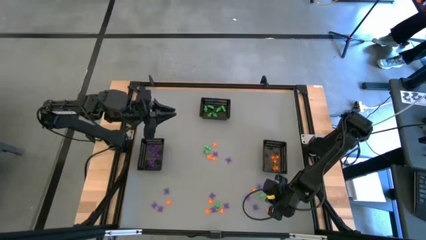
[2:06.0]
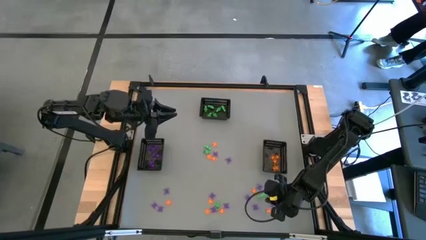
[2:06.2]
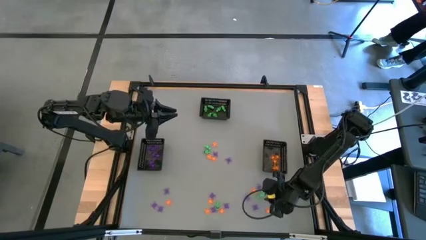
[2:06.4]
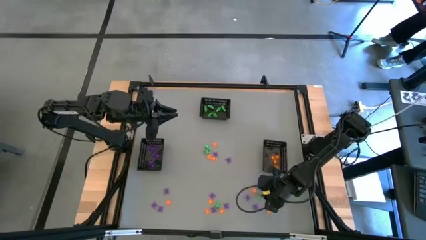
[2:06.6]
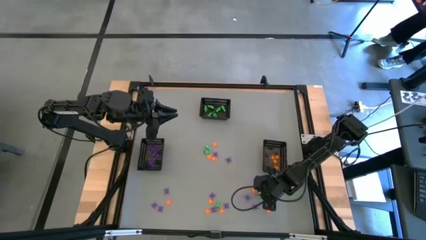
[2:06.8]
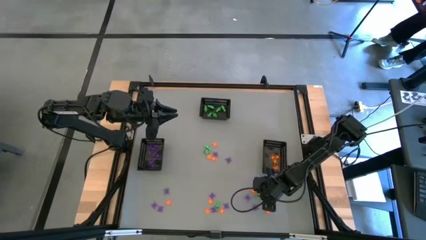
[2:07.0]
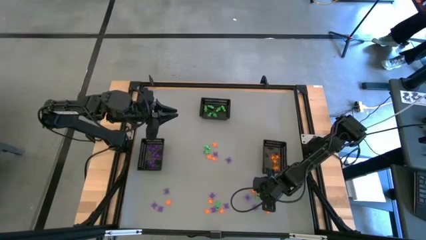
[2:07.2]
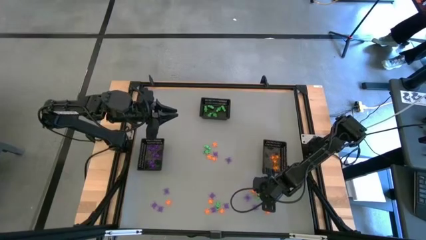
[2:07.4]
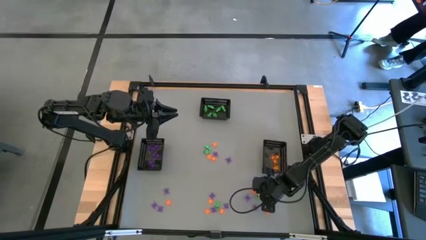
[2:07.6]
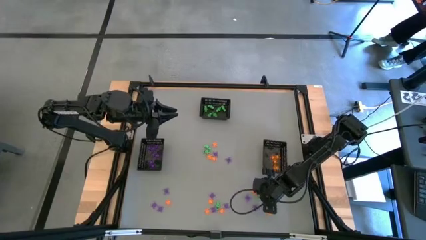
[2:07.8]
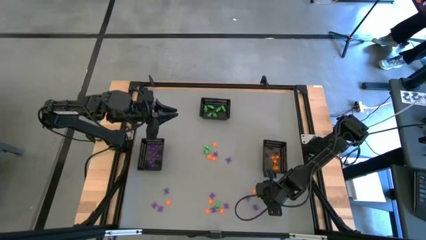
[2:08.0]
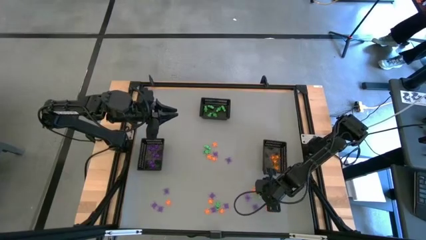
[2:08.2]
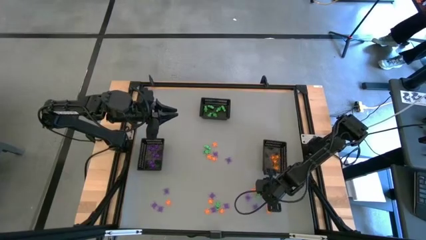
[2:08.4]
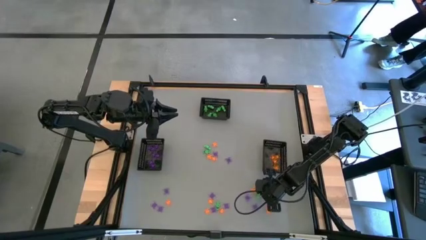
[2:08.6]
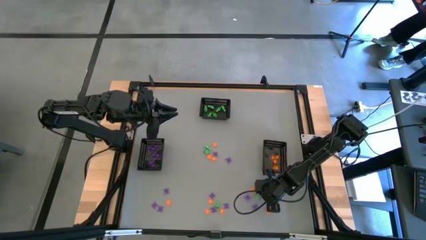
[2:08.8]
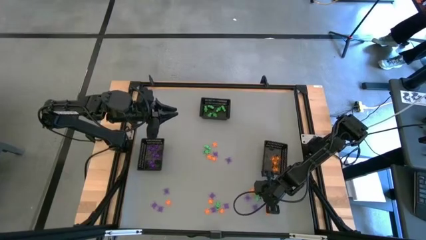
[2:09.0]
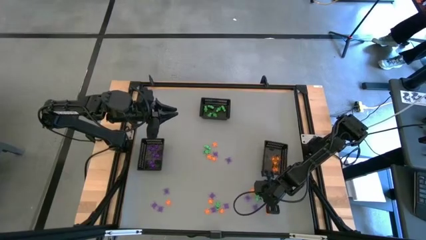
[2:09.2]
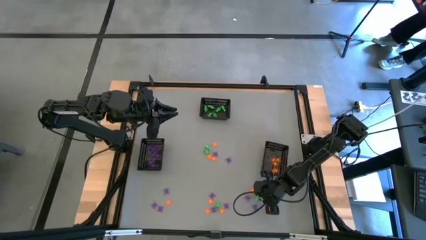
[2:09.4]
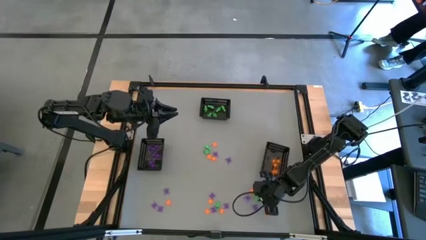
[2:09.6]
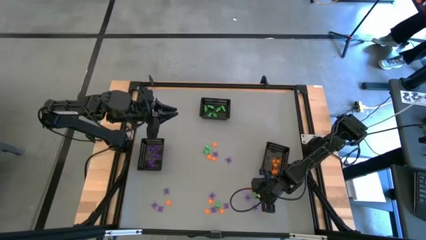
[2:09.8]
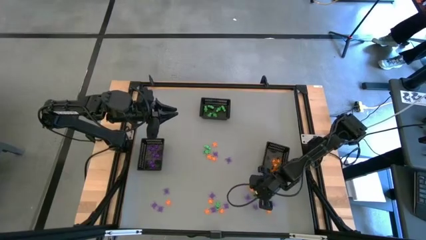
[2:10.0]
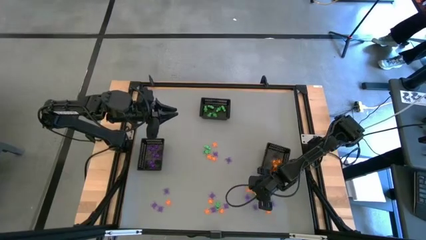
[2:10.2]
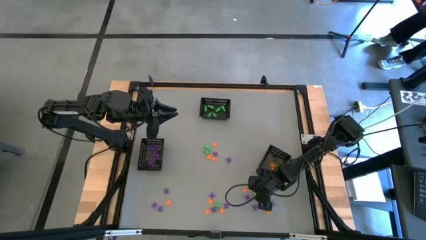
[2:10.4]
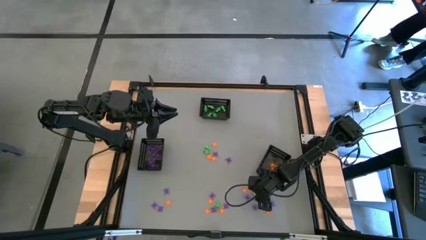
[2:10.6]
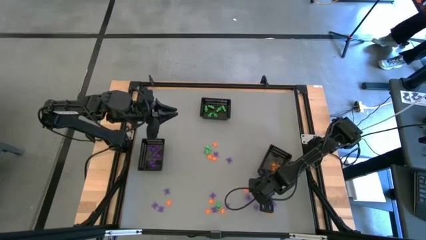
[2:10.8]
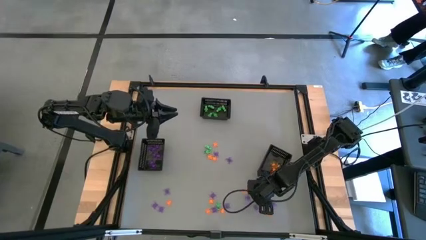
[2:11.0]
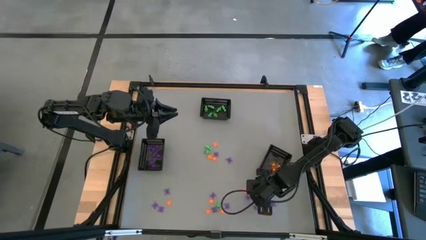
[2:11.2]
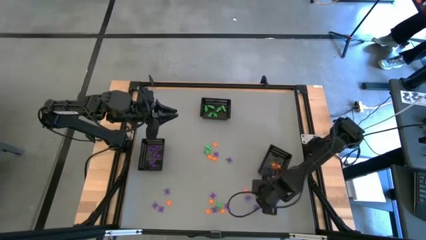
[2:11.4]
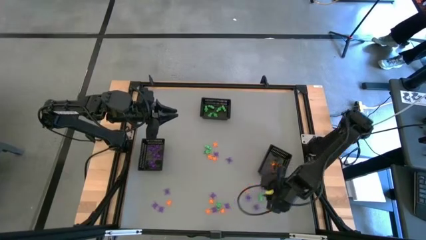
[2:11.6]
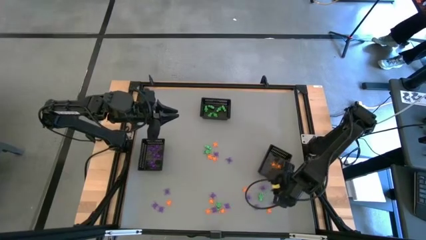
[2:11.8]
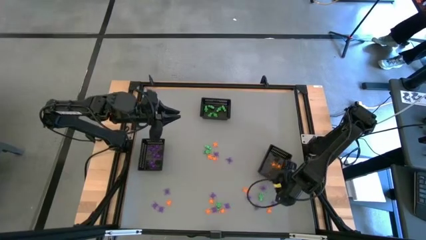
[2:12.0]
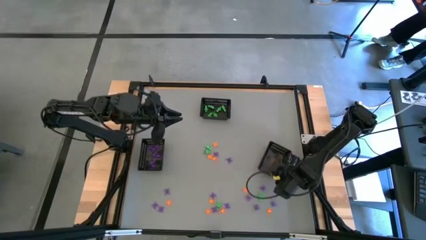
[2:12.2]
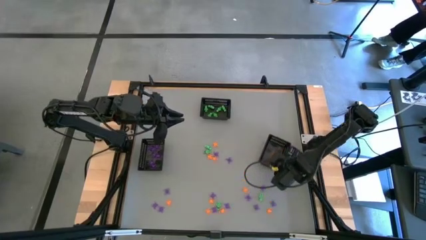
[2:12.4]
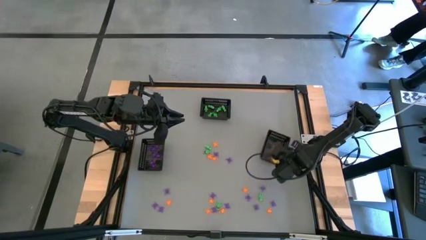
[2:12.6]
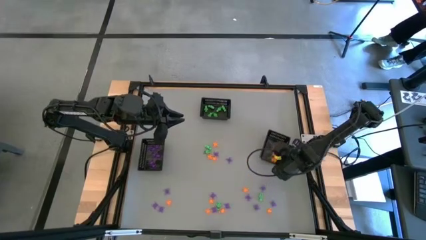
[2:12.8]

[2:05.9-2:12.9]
Task: Sort Halloween decoration
Adjust the right bin

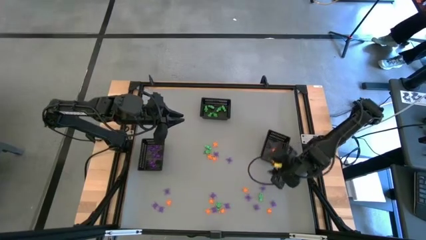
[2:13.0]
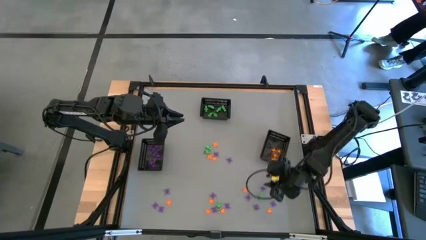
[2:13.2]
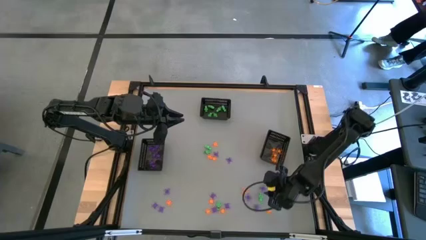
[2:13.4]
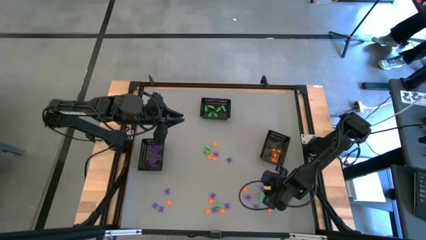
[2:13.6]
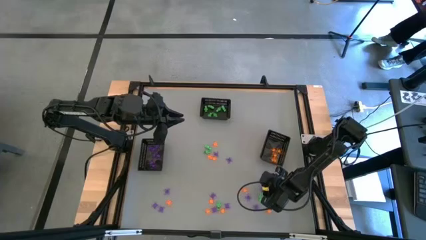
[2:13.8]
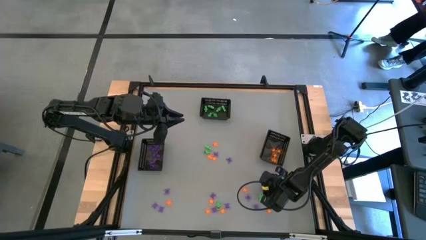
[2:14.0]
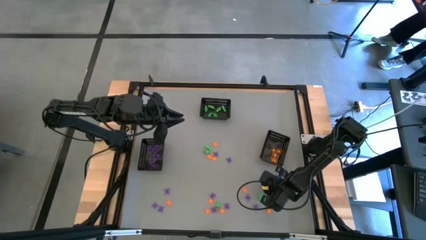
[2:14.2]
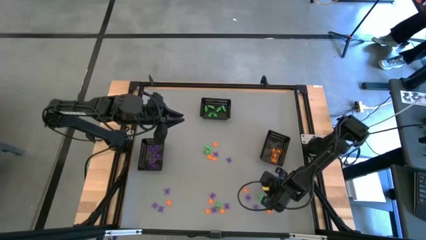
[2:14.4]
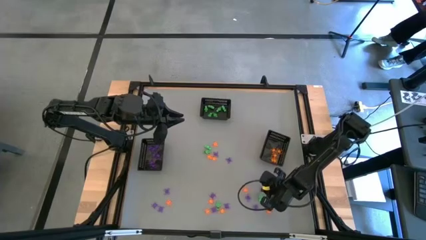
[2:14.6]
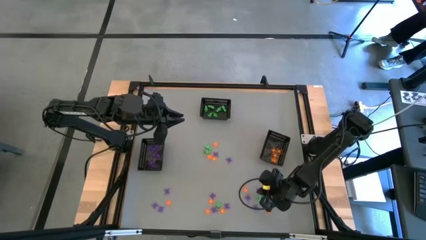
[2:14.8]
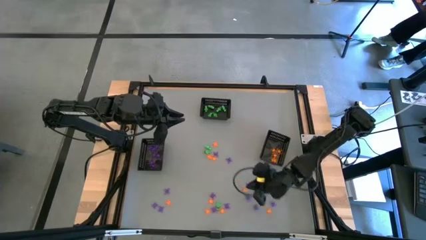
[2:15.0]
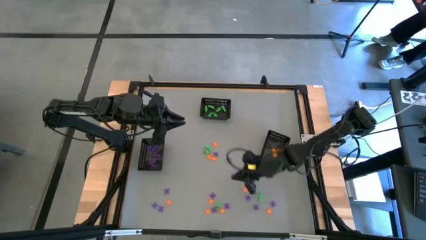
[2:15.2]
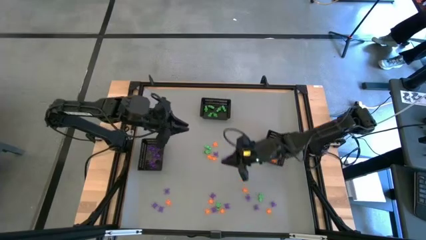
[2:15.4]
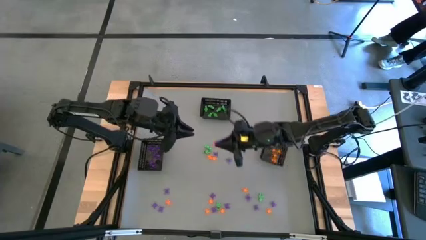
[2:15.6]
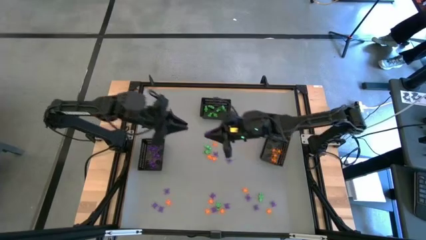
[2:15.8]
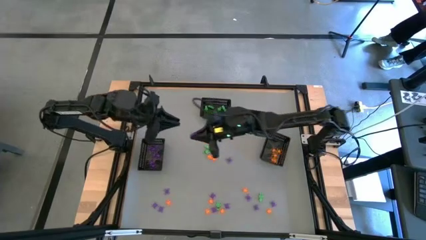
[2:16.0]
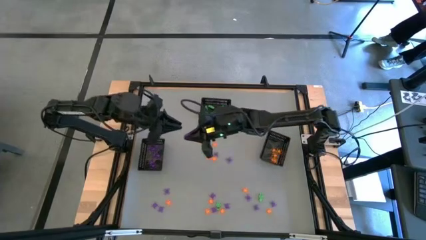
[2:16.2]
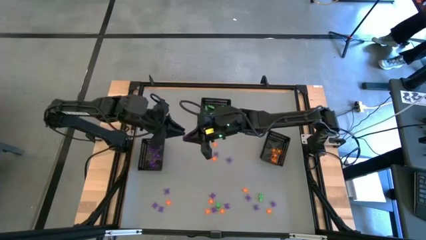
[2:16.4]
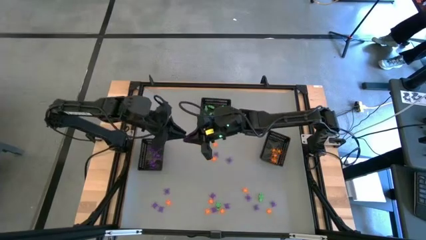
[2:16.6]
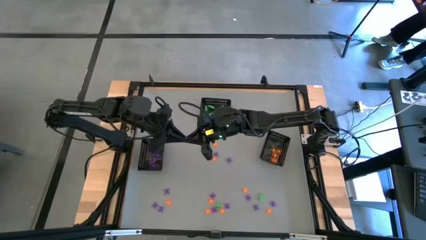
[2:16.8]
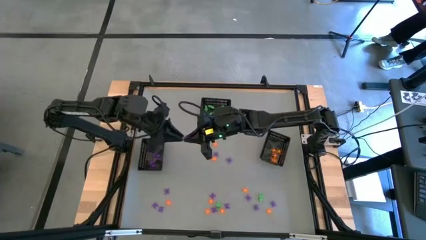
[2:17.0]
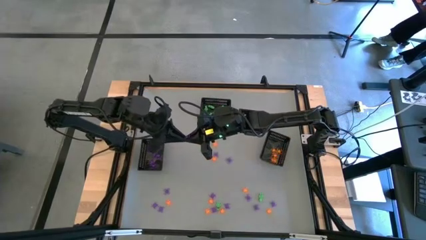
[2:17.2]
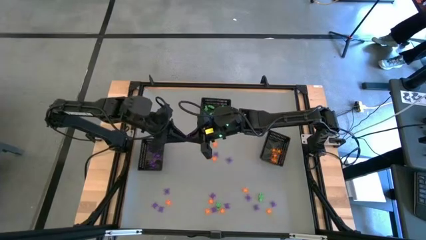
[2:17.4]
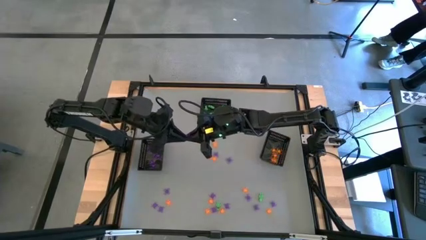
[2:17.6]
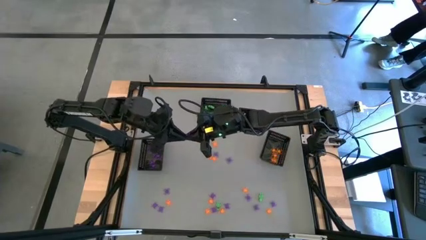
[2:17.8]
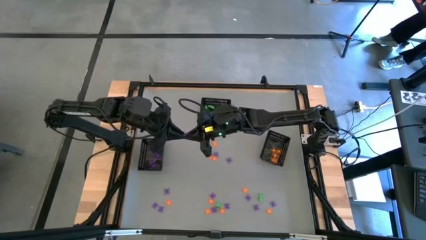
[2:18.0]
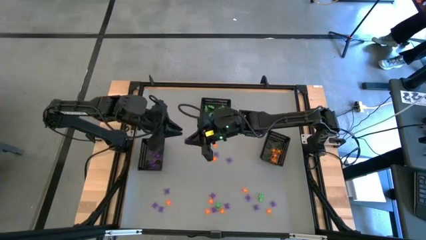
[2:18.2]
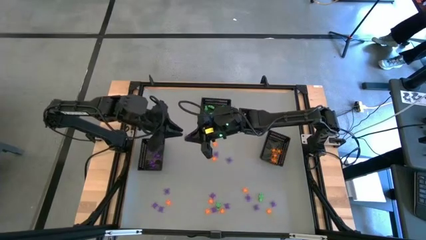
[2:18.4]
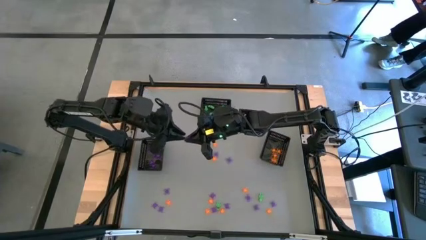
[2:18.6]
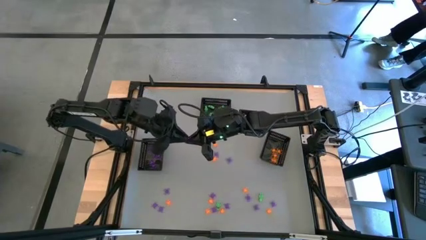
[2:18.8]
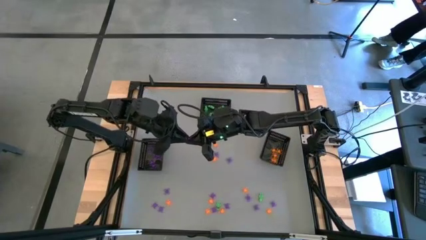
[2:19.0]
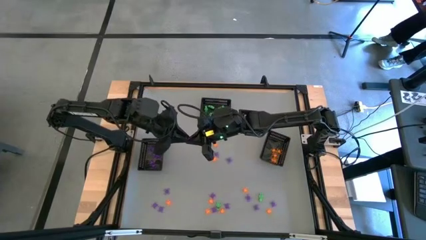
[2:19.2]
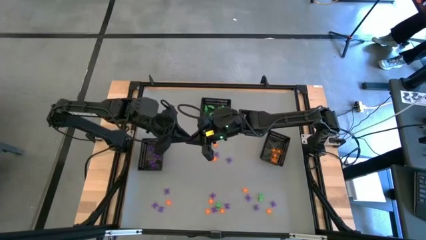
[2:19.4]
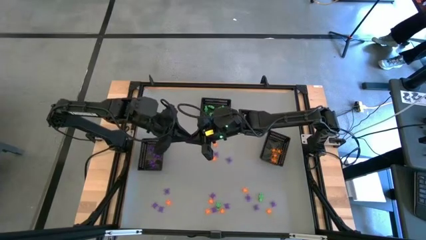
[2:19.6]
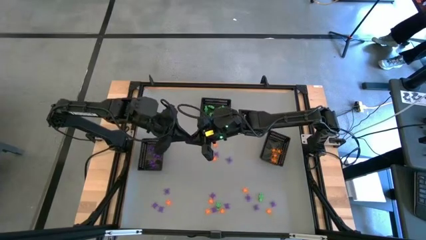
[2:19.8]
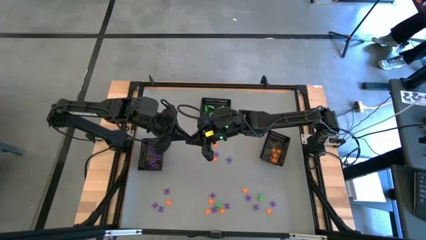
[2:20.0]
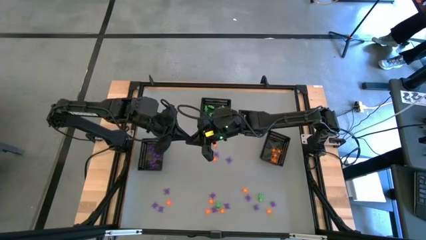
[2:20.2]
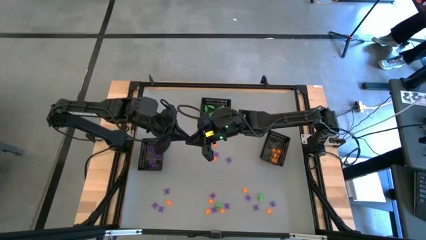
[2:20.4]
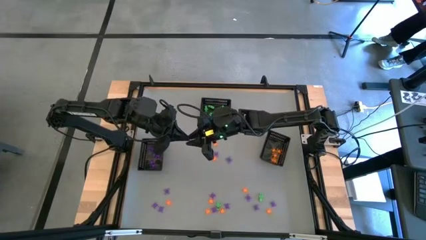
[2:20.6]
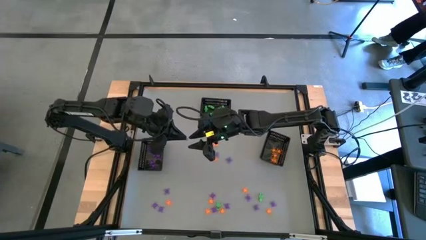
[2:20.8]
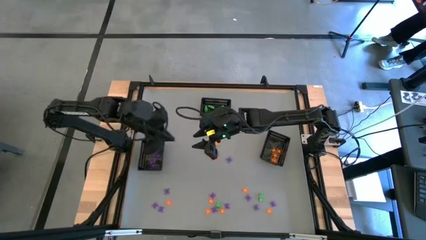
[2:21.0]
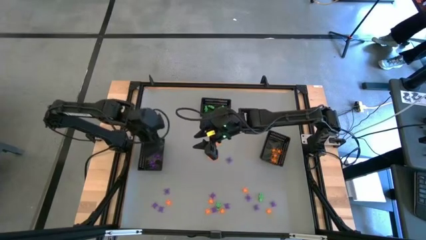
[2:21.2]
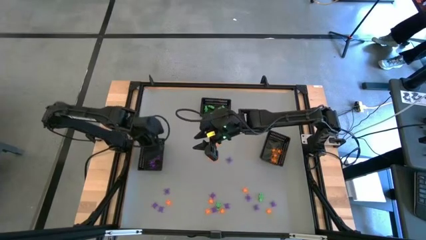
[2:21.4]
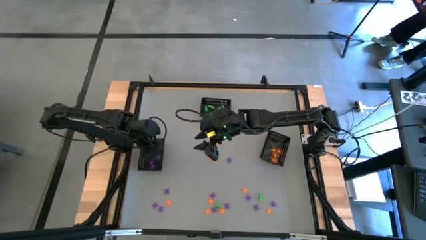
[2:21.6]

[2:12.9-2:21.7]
Put the violet spider toy into the left bin
